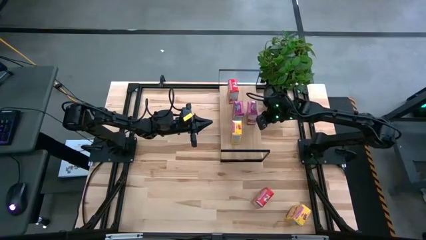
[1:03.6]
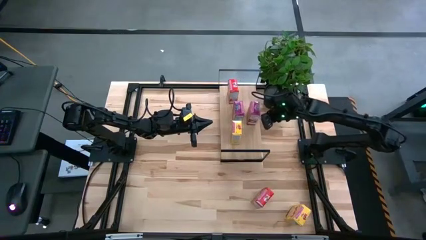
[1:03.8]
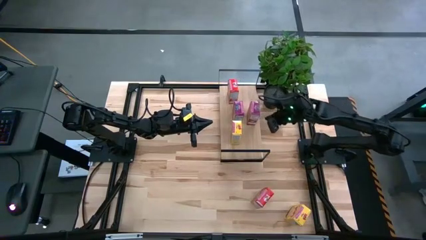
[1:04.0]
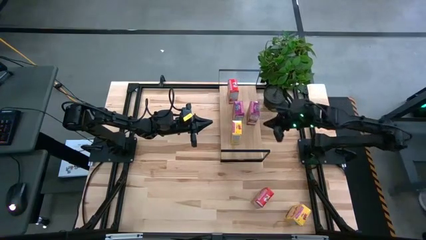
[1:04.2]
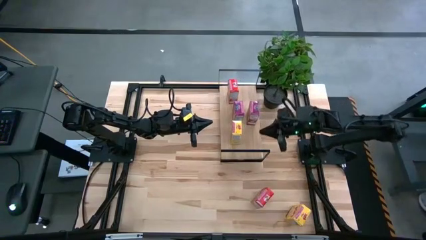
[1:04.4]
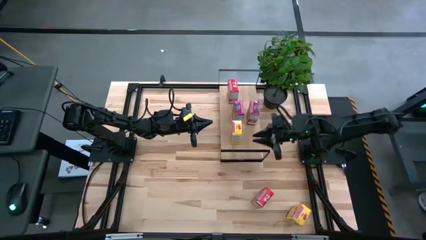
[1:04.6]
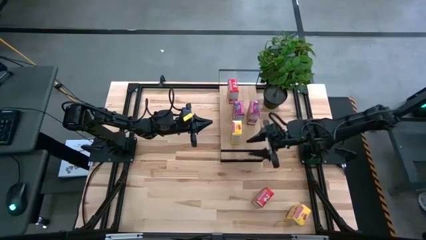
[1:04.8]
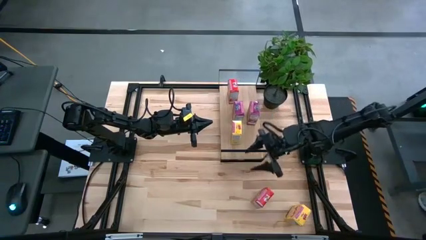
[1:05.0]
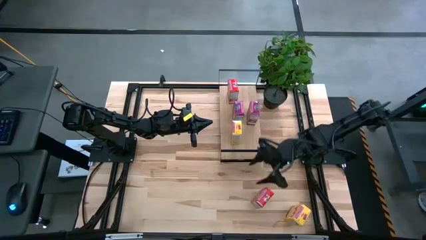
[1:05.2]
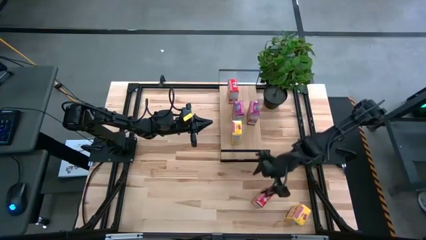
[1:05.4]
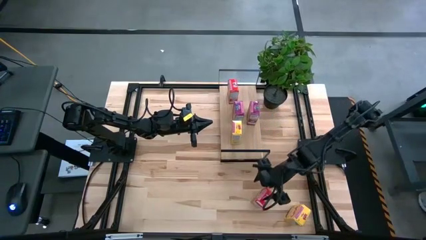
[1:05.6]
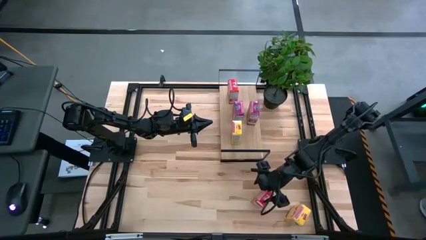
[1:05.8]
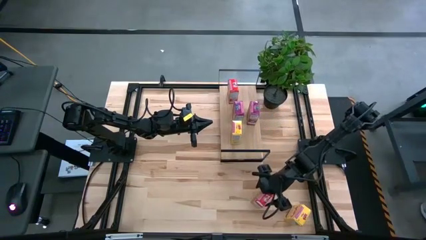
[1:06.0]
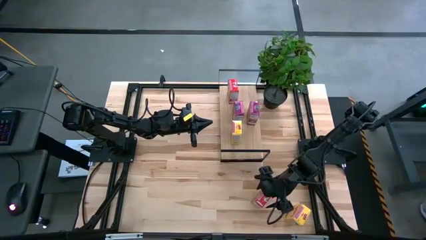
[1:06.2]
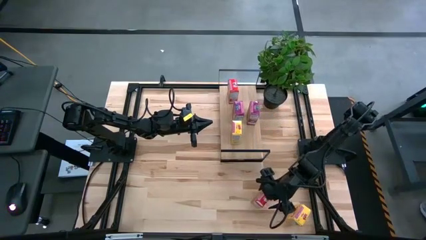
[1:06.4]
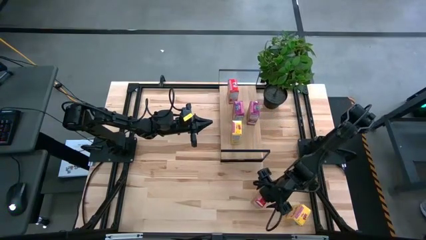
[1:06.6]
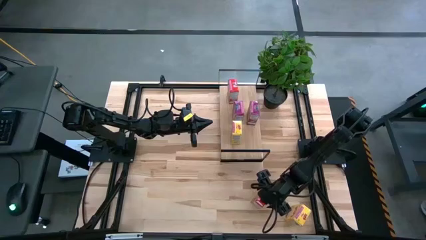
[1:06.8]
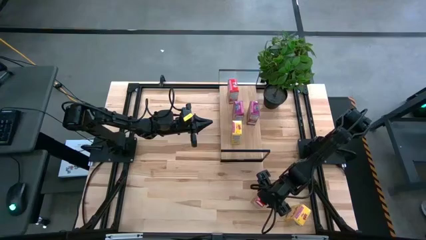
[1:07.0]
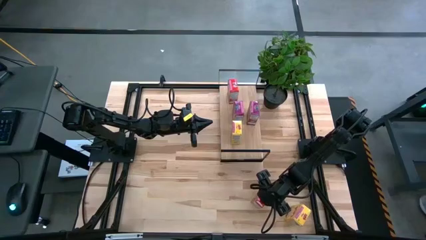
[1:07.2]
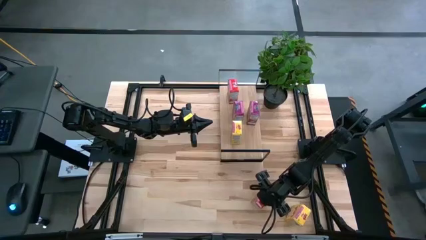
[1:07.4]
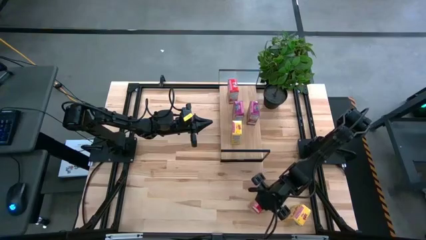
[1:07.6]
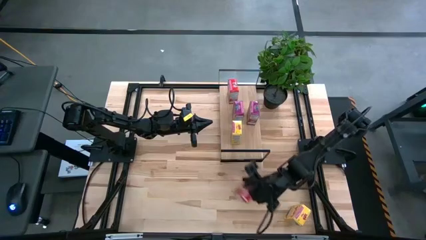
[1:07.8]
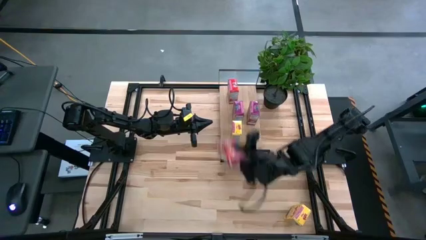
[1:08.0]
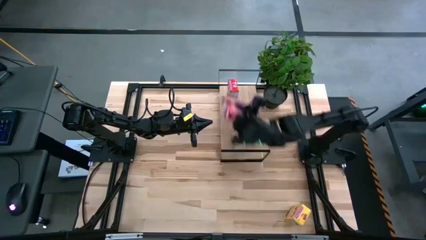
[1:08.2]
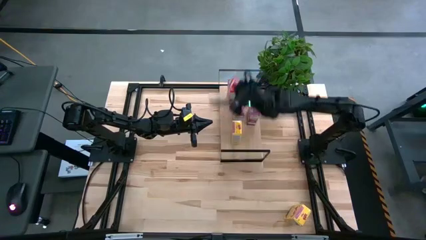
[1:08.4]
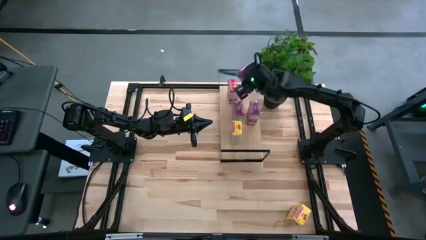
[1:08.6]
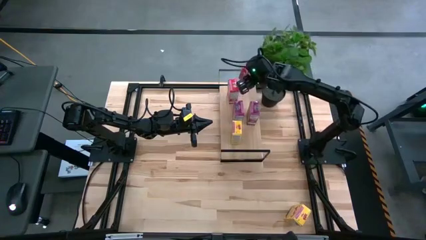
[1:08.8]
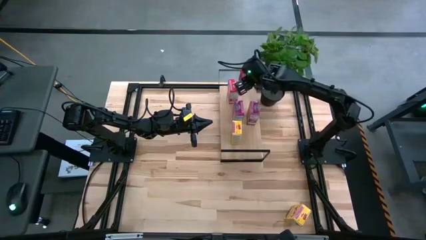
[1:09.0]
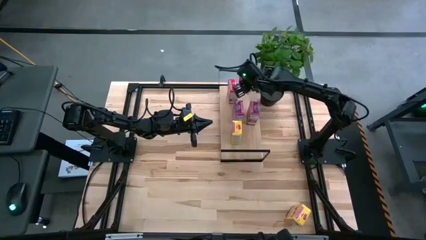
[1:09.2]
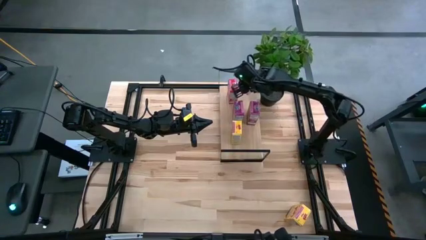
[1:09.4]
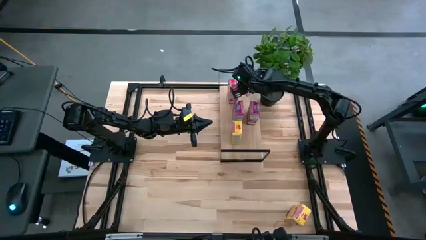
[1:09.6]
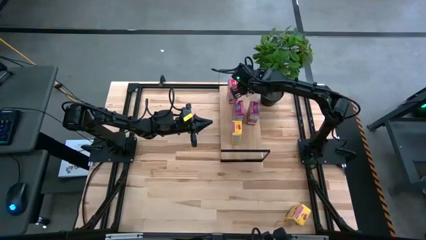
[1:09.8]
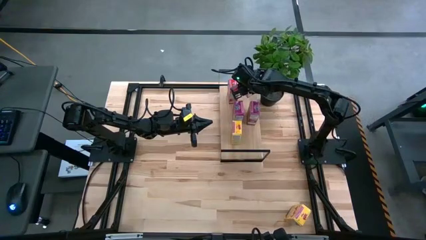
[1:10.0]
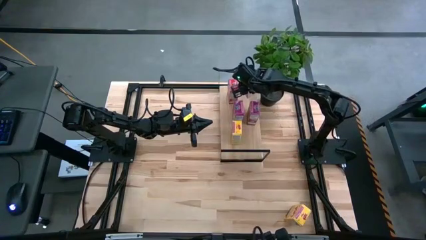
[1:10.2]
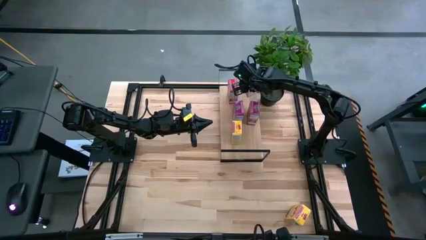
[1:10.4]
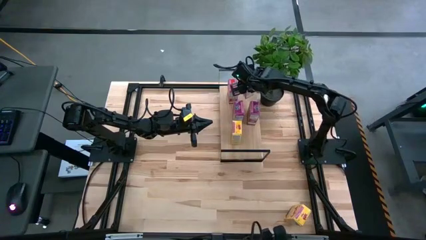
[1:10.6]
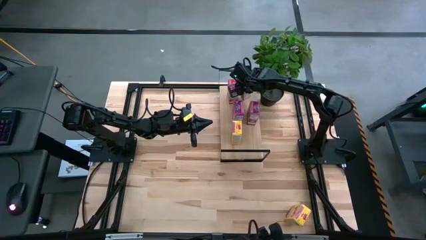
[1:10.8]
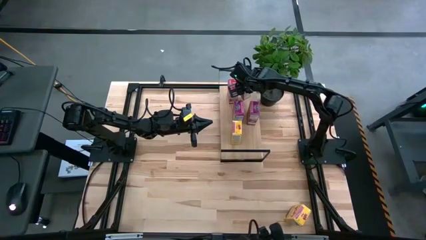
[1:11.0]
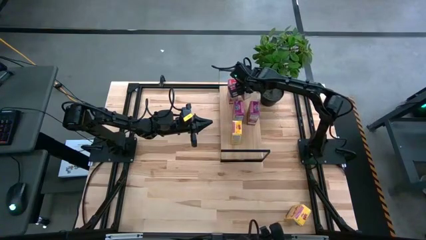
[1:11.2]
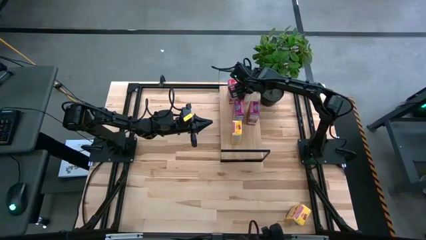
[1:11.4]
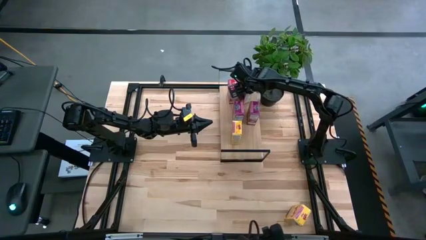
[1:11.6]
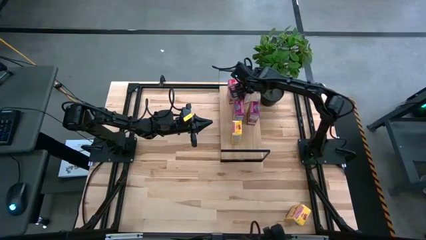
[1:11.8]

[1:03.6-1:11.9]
Task: Stack cereal on shelf
Put the red cereal box on the shelf

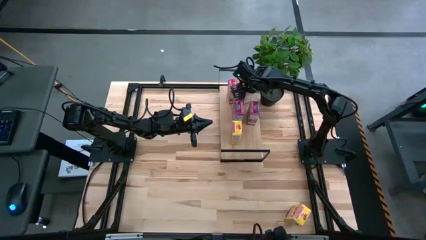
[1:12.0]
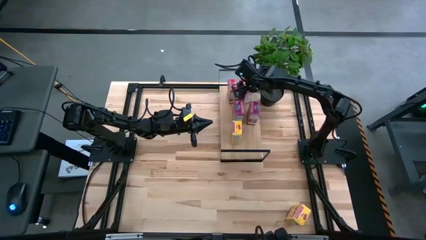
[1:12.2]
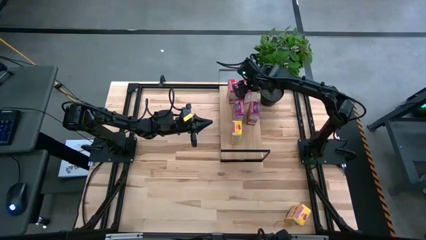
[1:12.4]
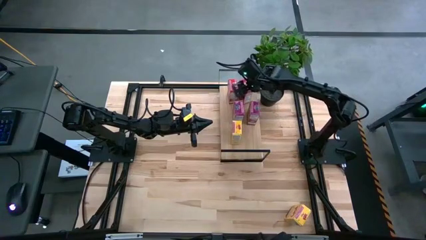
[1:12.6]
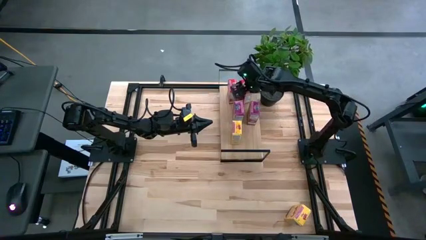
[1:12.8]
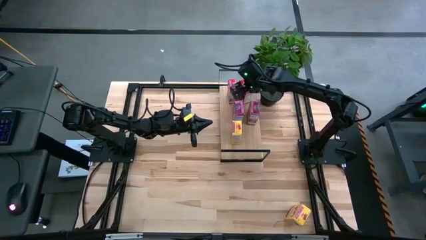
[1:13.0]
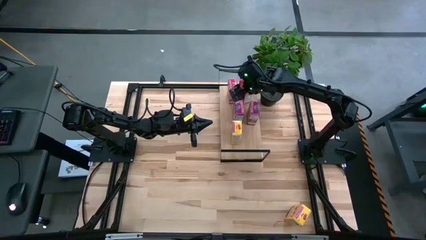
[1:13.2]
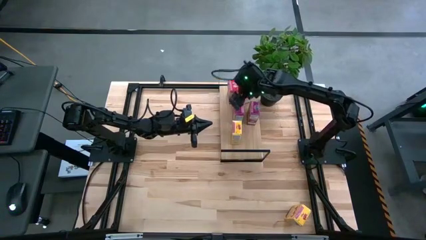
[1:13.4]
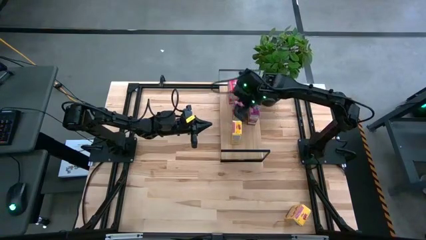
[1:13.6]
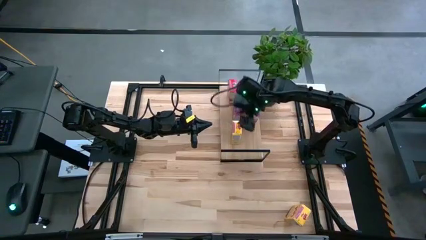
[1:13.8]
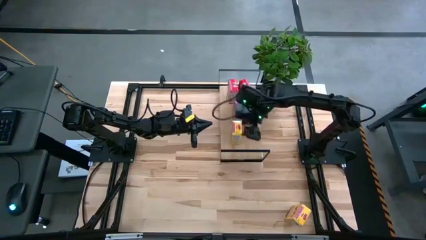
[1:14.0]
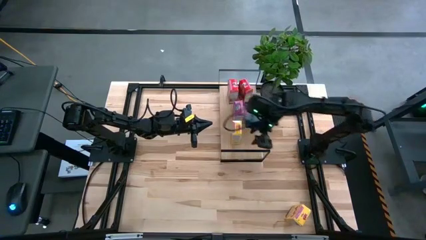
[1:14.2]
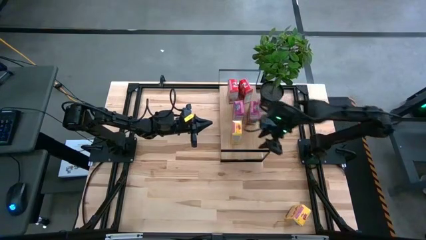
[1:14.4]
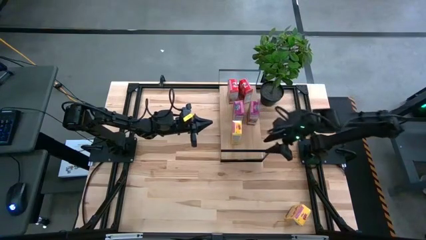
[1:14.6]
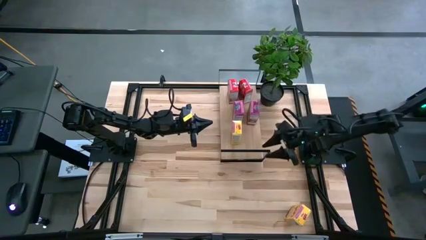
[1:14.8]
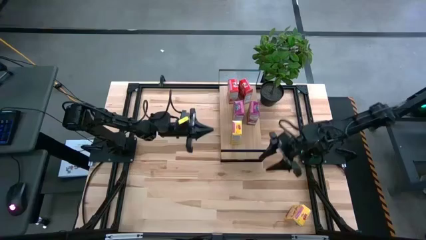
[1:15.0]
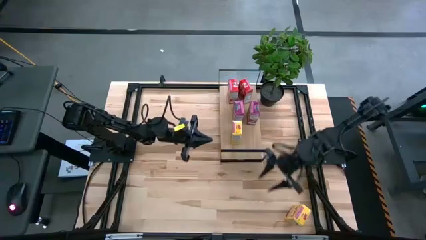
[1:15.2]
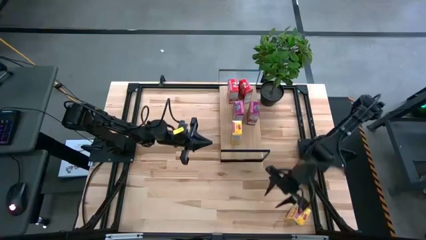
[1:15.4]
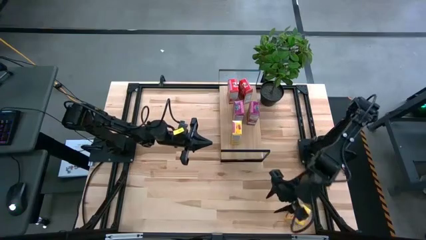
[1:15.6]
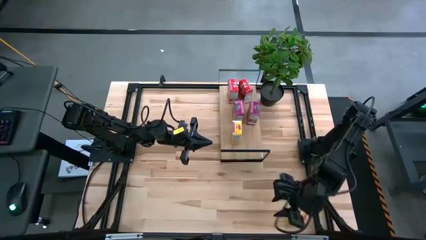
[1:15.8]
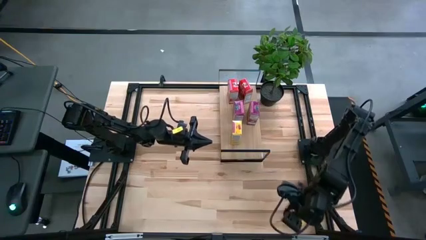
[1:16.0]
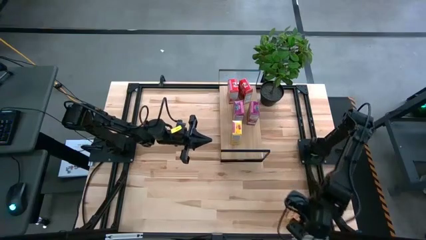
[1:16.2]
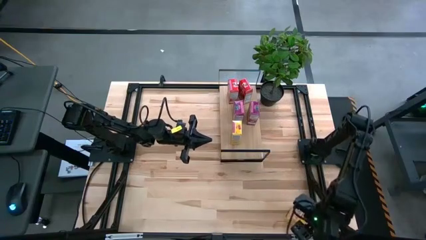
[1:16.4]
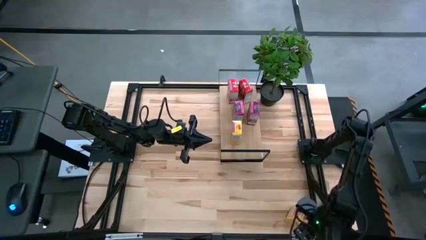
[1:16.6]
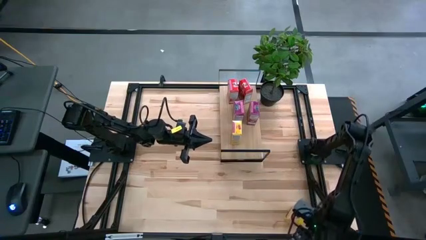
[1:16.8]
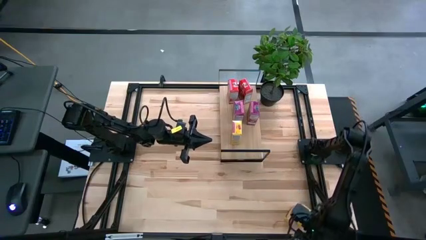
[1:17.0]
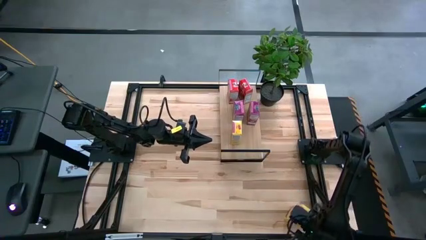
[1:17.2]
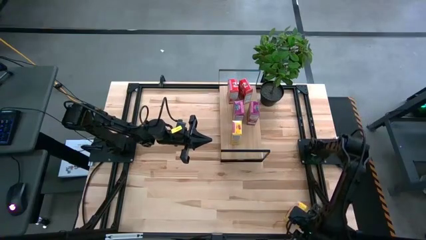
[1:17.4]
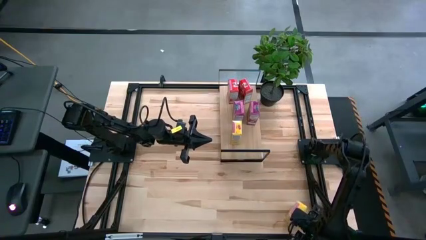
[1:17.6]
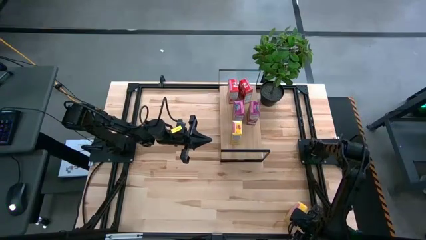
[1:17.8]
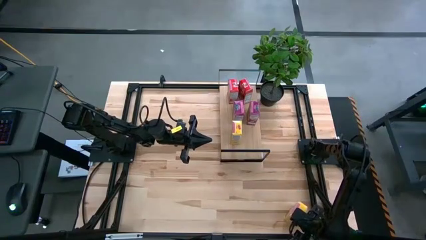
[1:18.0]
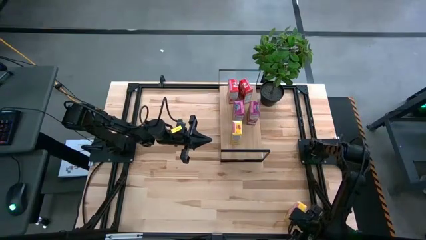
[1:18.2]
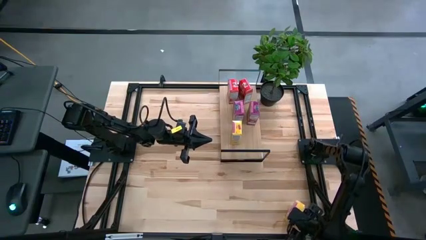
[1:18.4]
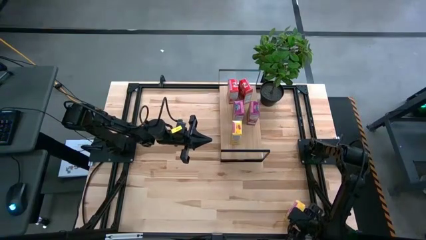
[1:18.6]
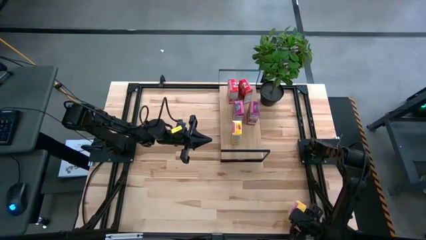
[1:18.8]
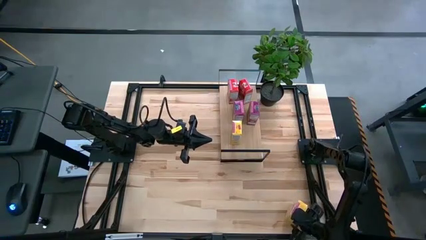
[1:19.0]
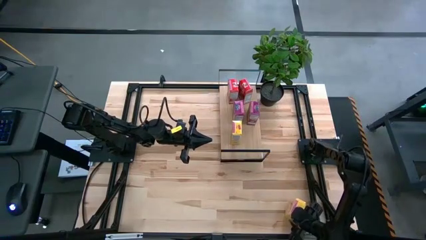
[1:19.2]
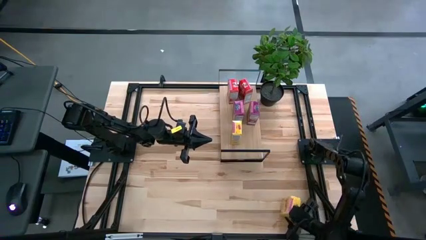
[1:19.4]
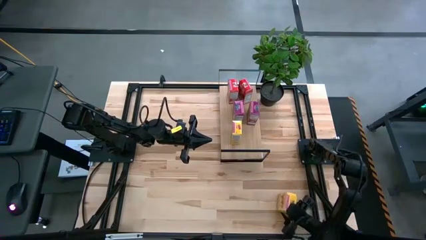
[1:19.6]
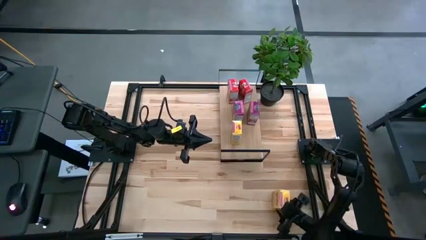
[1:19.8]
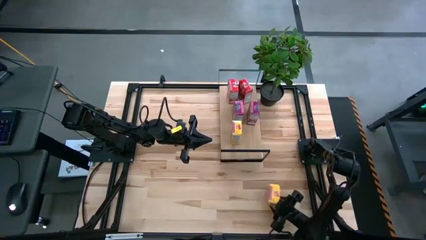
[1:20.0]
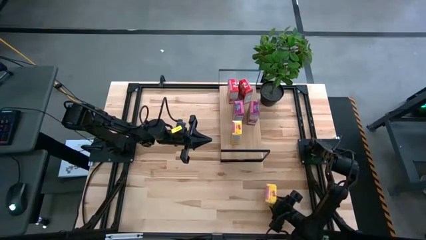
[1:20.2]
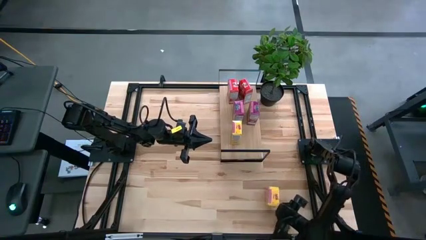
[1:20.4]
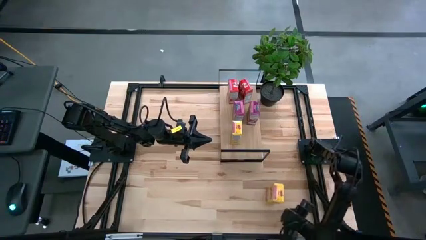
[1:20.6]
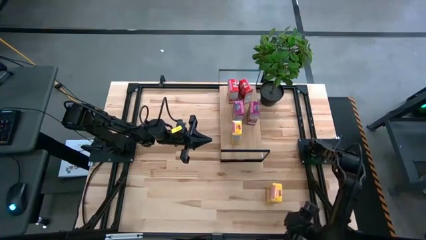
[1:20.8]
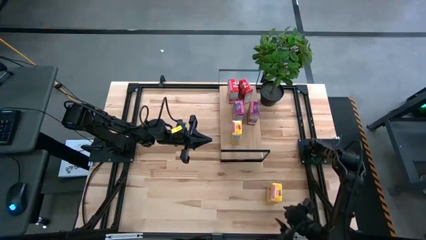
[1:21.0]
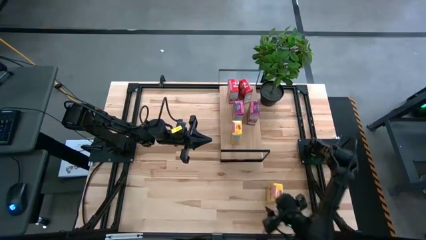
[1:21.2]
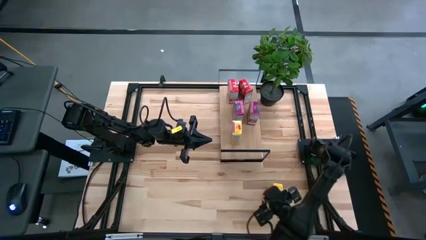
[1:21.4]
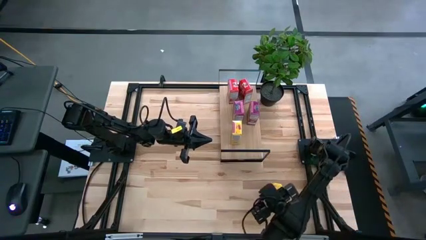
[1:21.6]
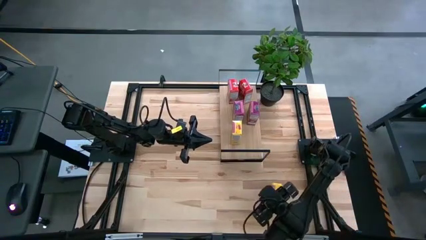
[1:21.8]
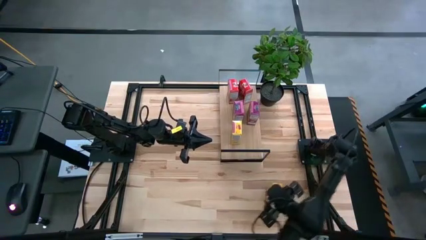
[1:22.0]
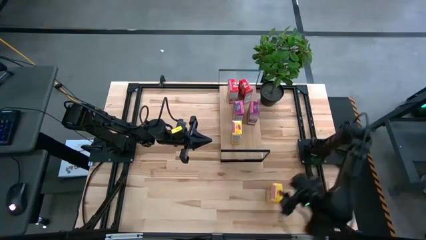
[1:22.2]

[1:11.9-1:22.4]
Put the yellow cereal box on the shelf
